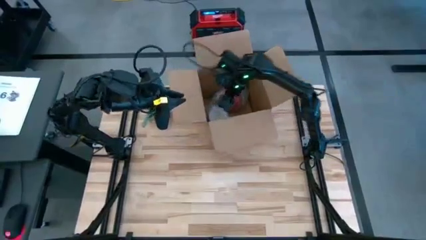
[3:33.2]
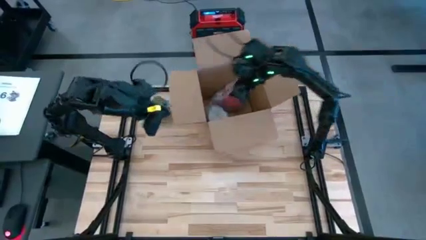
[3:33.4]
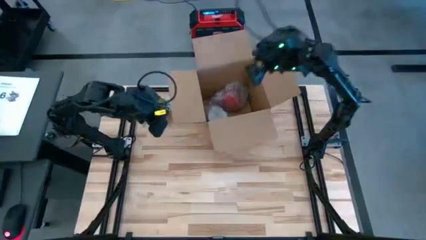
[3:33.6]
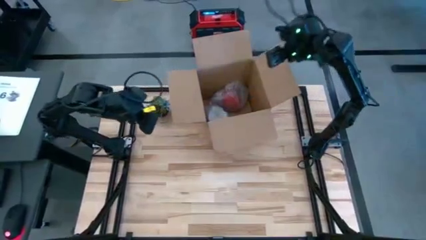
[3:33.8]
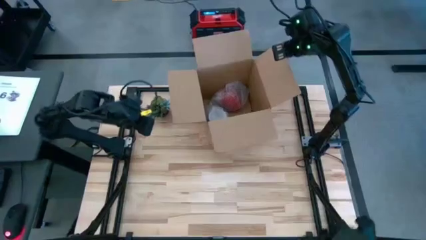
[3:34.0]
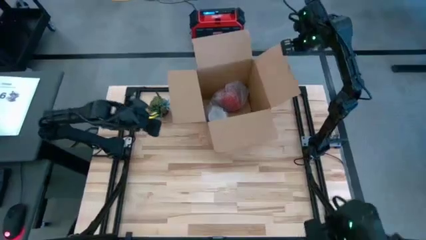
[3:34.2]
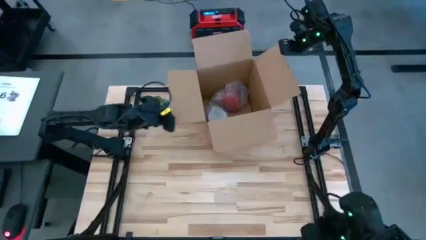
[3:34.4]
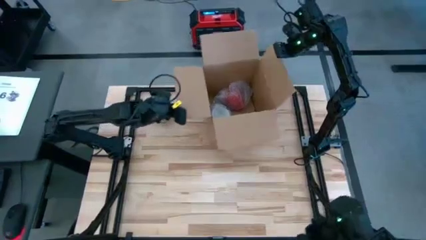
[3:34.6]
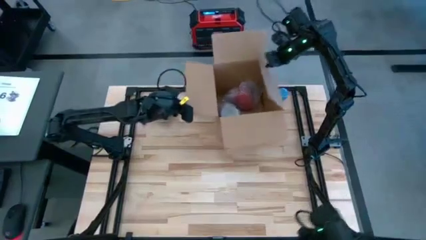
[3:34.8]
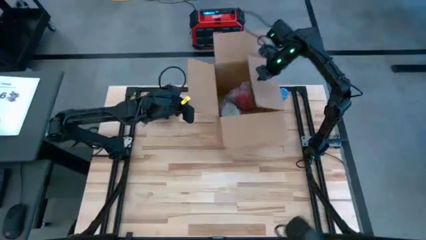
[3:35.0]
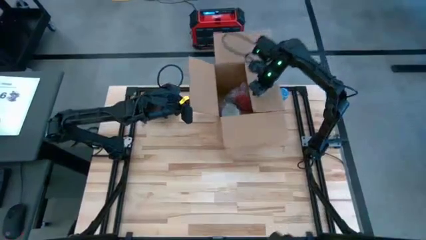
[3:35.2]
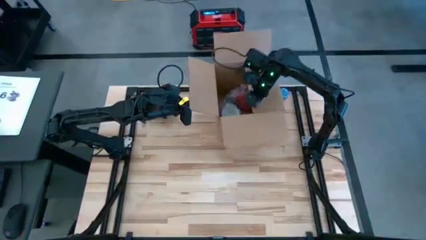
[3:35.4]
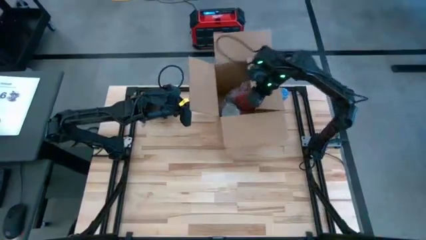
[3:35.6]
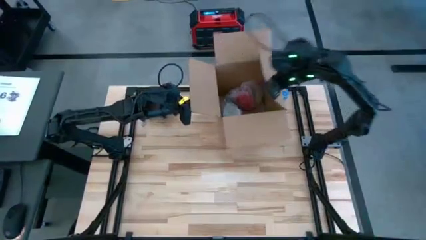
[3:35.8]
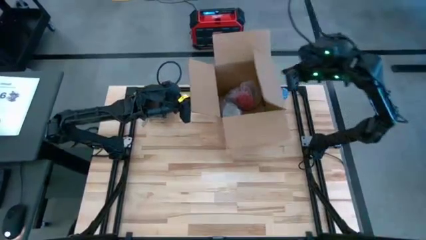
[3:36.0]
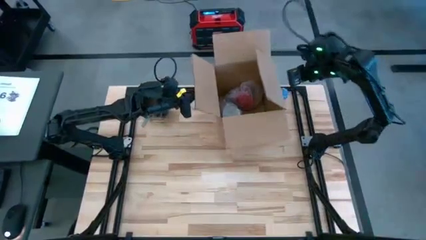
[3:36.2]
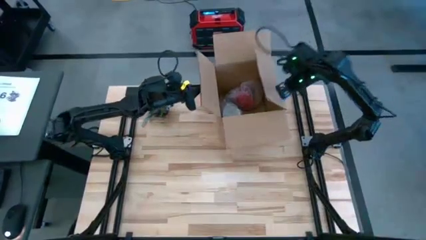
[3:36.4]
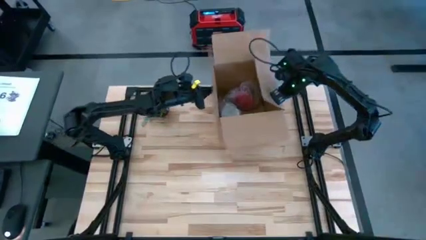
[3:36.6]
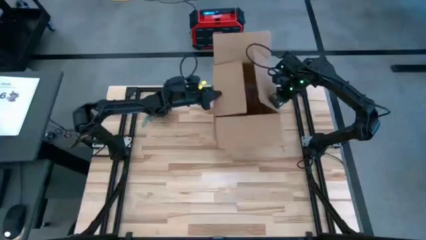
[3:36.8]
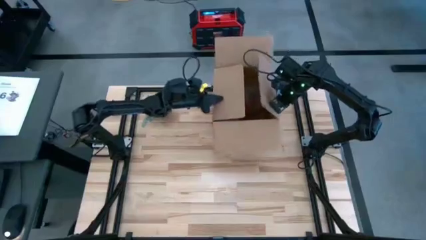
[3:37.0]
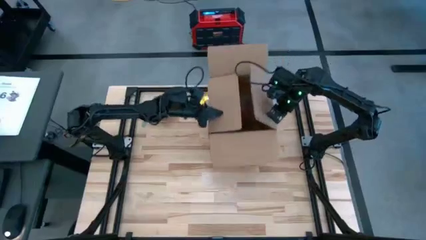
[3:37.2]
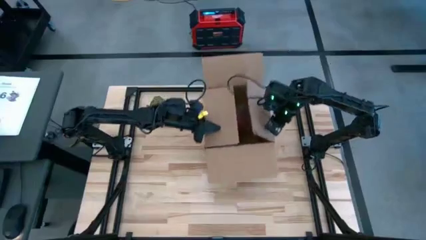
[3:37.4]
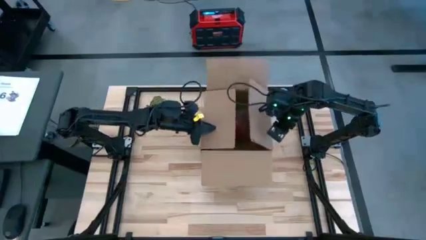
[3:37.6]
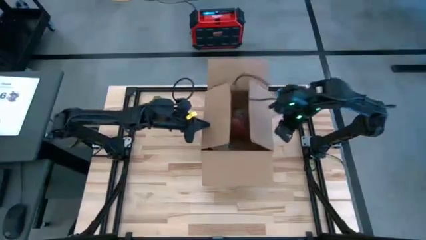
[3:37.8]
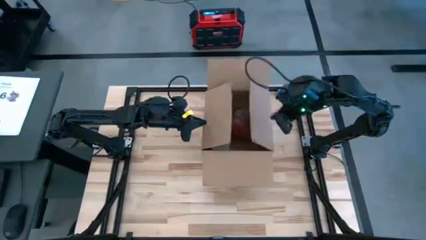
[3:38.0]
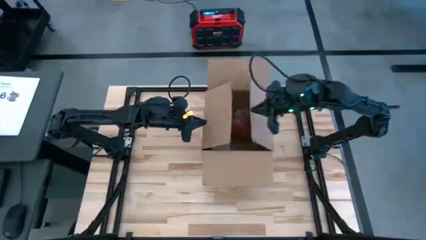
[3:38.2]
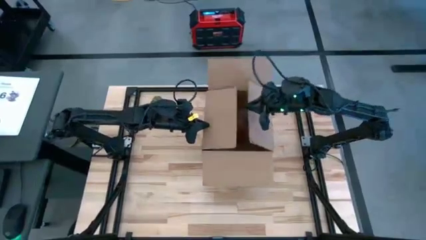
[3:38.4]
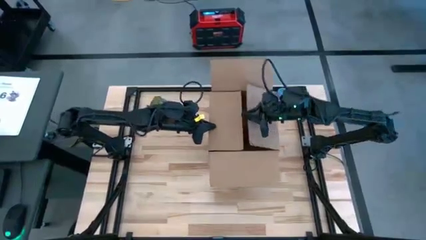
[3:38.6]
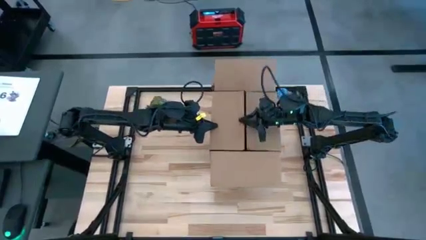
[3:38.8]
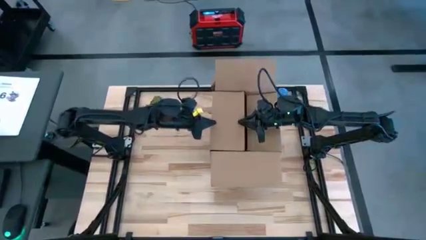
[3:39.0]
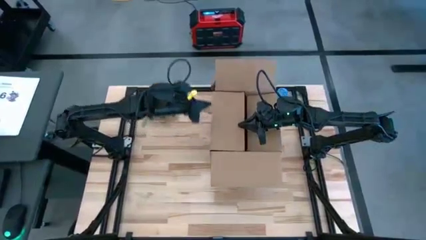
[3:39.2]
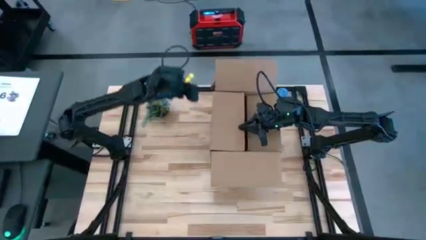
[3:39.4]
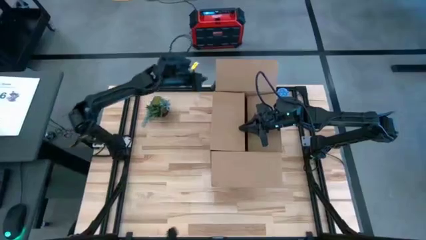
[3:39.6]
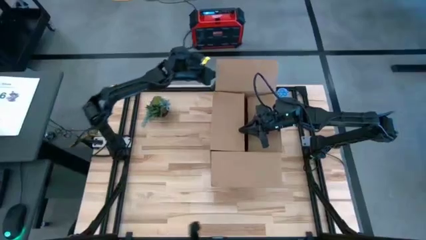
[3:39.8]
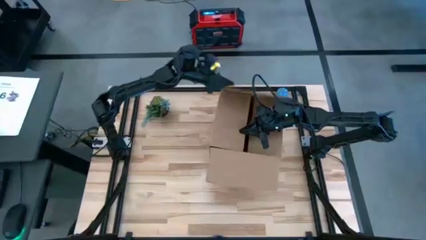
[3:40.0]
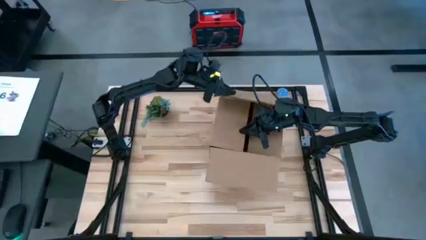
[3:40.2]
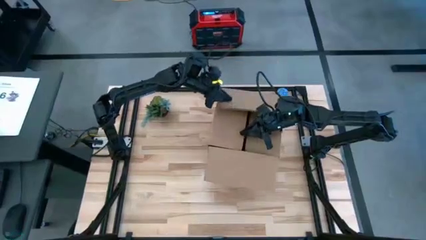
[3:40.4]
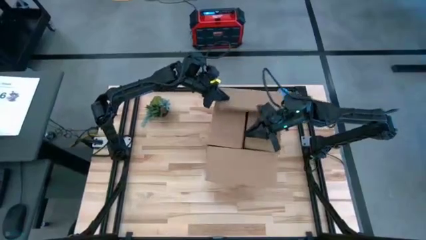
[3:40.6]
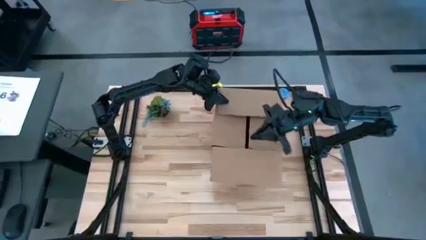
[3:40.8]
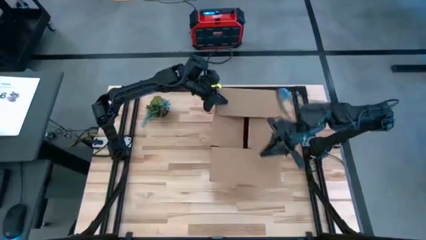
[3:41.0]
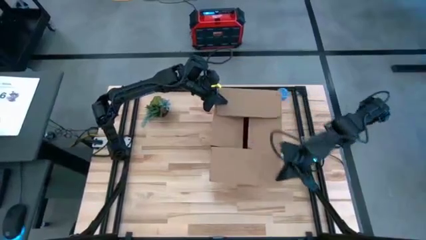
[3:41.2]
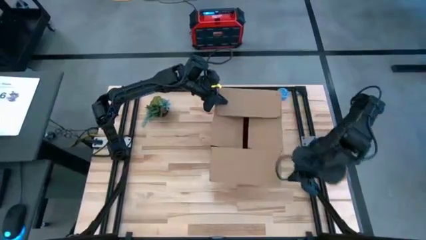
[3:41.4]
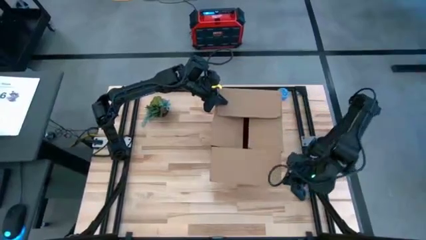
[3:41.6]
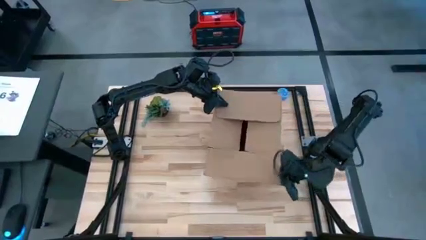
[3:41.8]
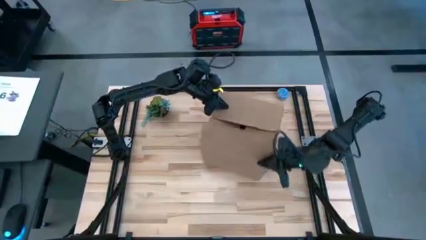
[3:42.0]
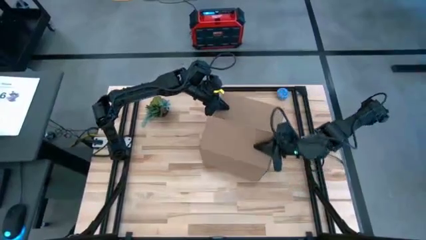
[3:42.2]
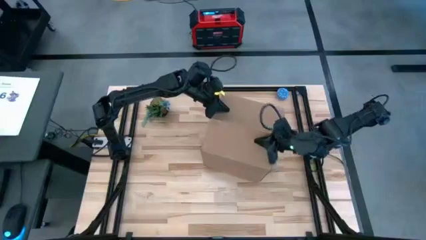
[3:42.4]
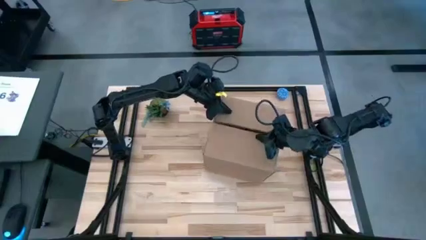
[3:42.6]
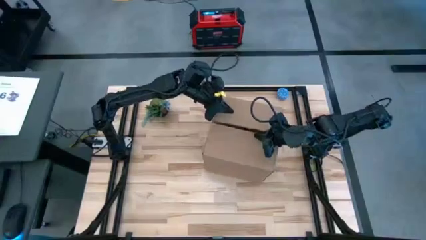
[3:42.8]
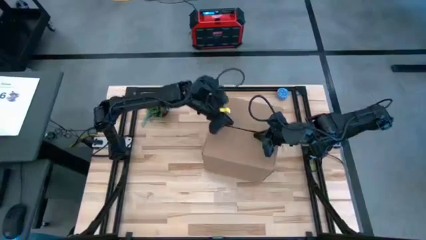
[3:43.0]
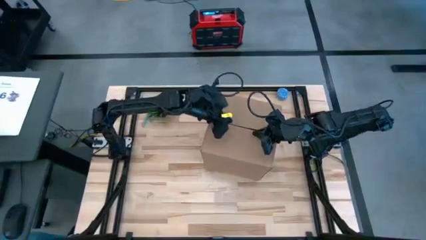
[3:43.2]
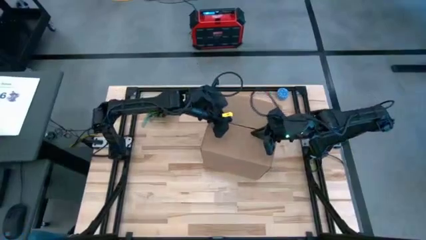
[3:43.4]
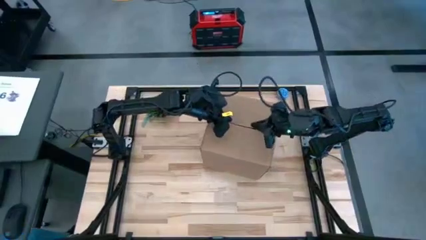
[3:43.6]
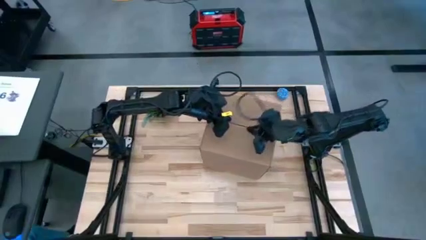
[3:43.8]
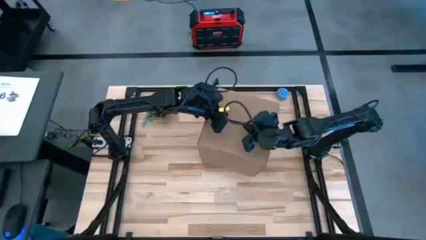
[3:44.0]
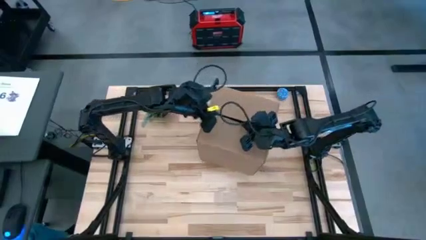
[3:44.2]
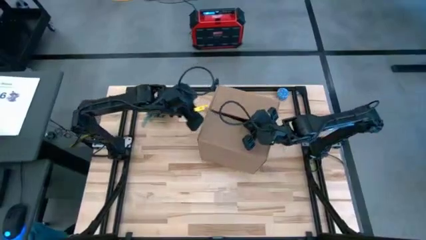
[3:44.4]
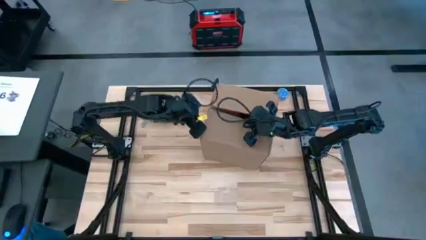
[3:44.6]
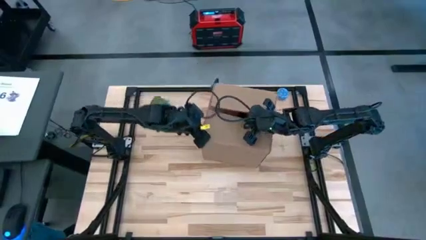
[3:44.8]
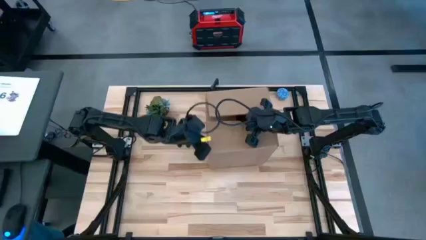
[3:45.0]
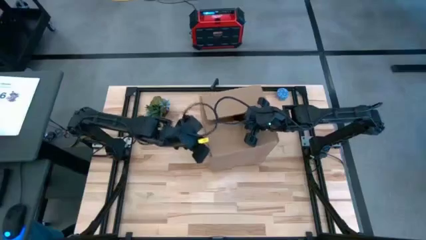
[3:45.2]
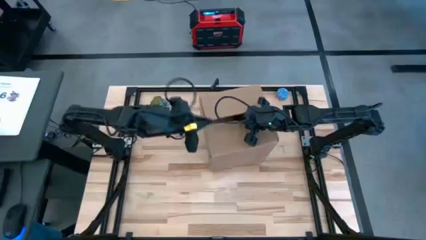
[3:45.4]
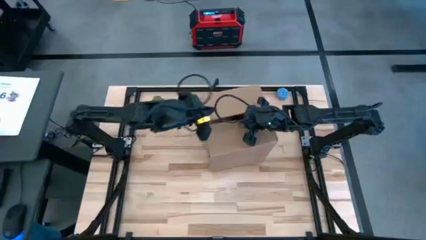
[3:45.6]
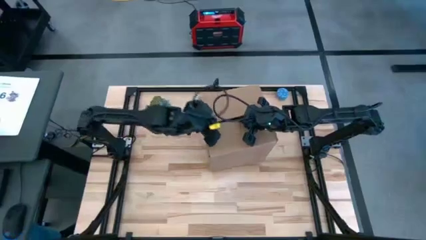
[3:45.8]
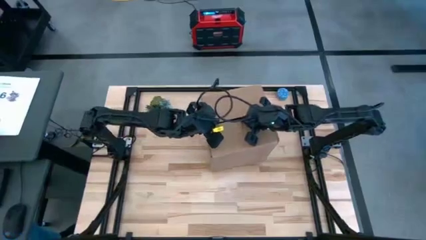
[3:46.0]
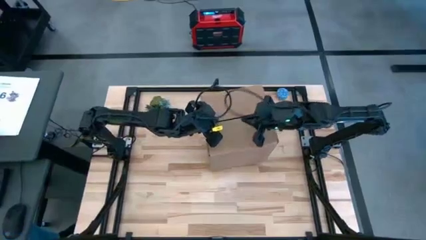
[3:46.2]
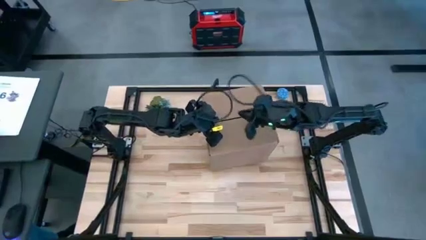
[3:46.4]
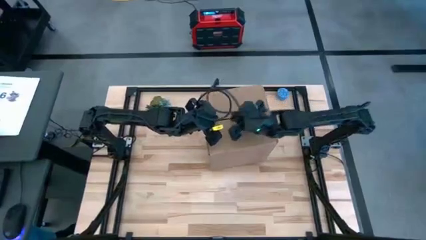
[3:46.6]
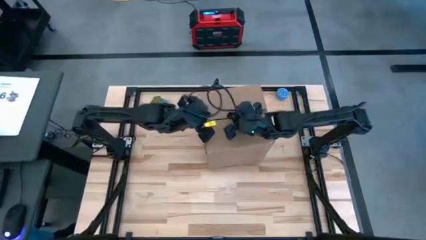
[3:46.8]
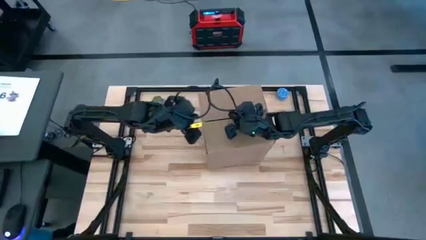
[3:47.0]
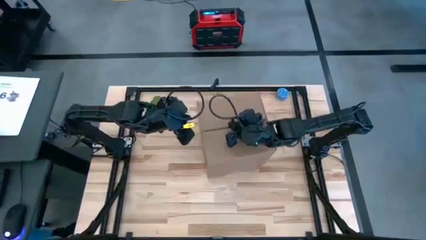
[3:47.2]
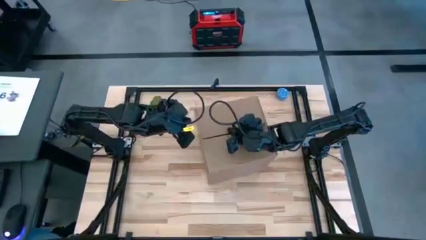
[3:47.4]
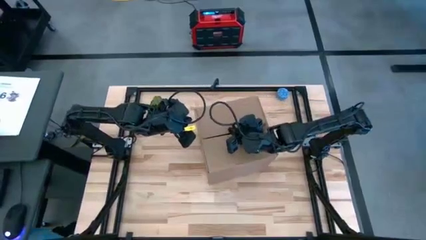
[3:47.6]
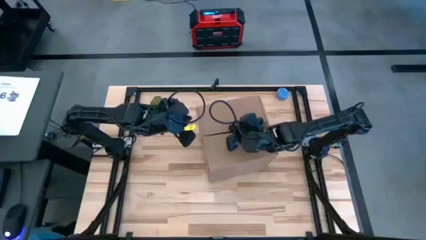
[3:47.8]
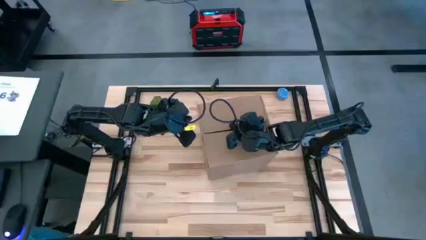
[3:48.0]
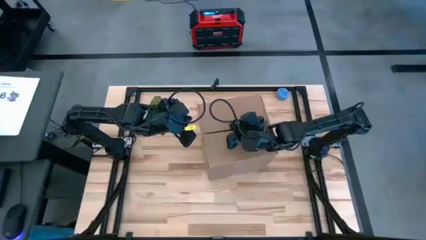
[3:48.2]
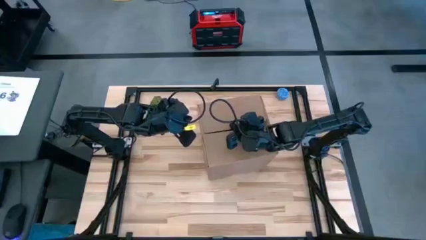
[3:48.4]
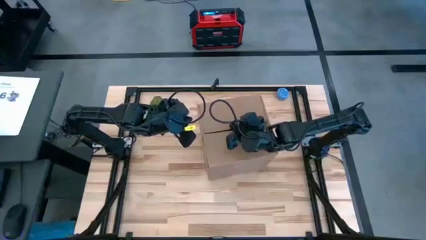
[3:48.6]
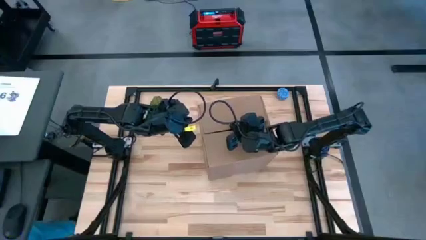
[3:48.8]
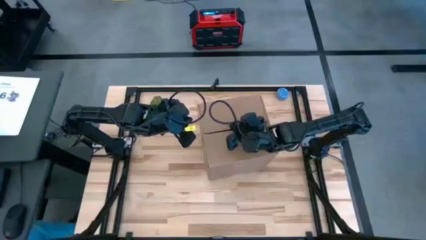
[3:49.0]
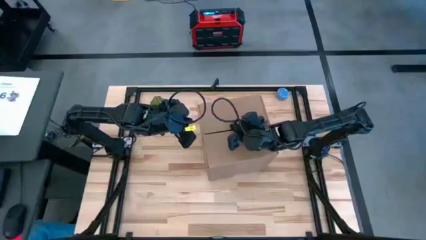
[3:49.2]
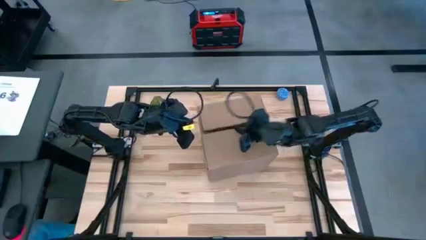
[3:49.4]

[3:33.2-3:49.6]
Task: wrap mug
Close the cardboard box
